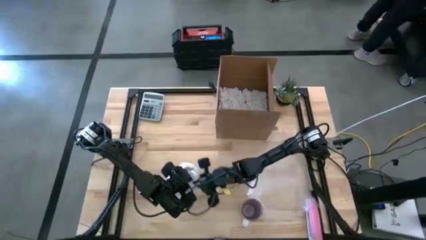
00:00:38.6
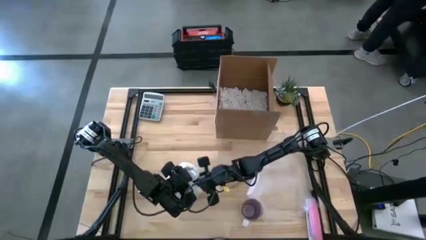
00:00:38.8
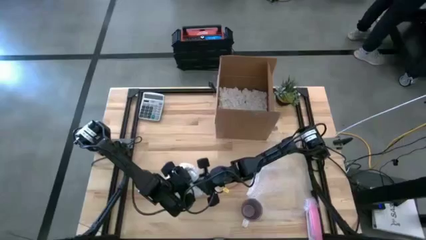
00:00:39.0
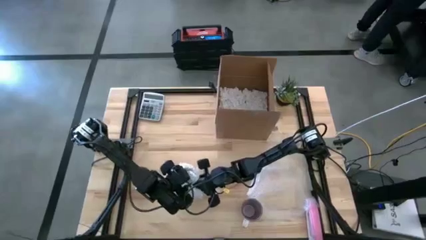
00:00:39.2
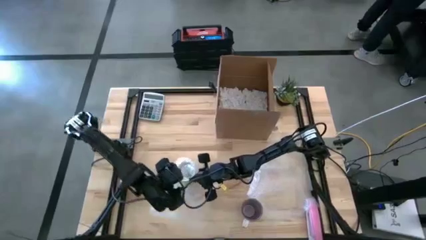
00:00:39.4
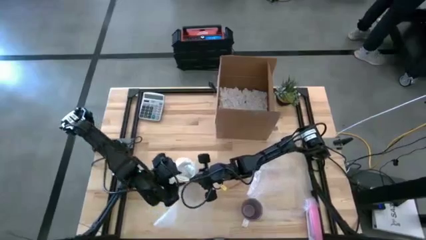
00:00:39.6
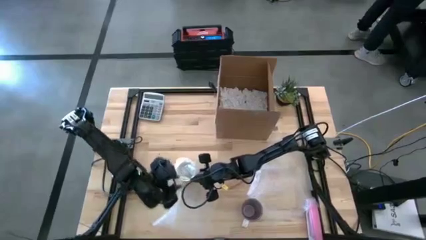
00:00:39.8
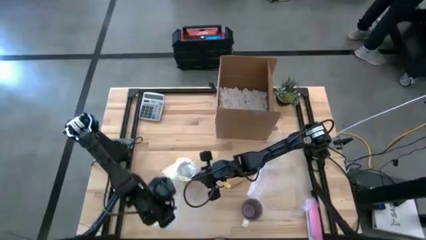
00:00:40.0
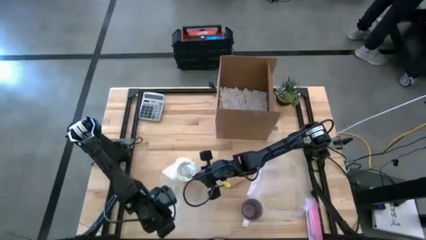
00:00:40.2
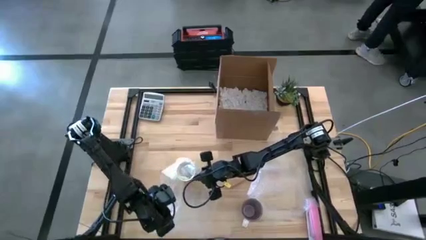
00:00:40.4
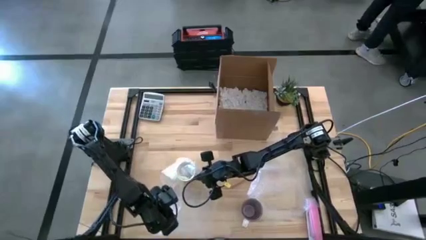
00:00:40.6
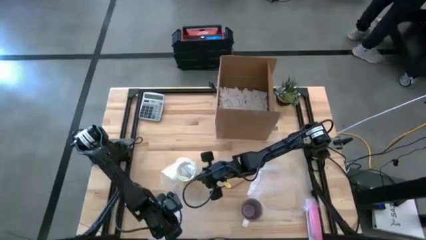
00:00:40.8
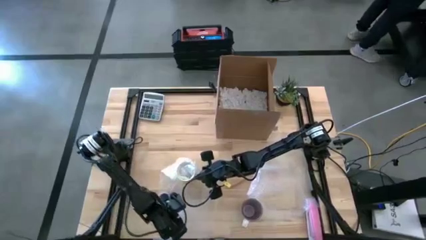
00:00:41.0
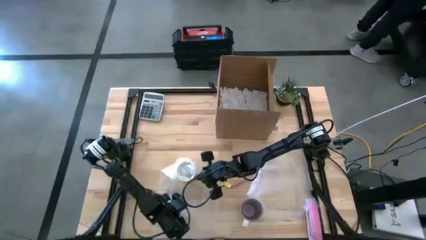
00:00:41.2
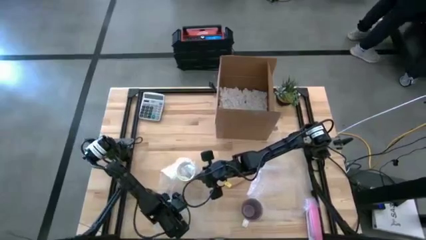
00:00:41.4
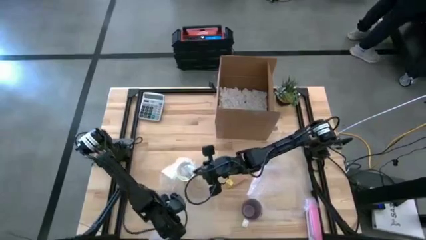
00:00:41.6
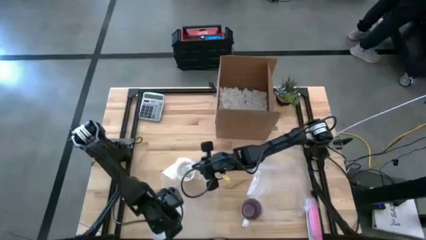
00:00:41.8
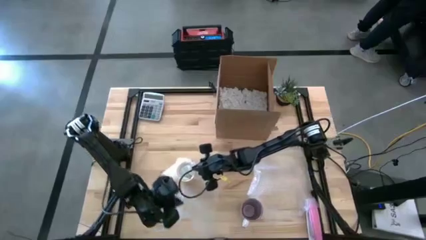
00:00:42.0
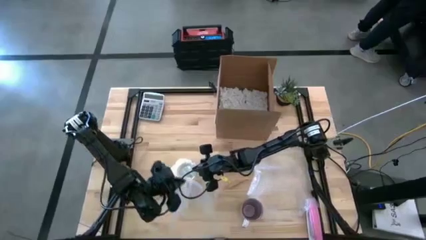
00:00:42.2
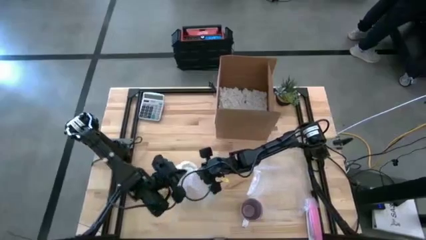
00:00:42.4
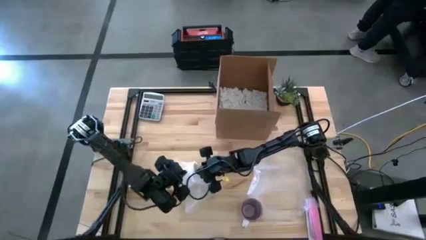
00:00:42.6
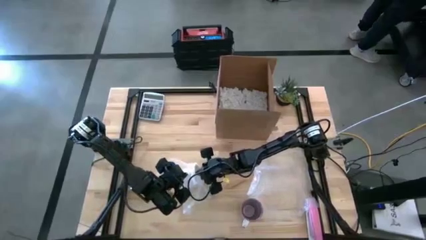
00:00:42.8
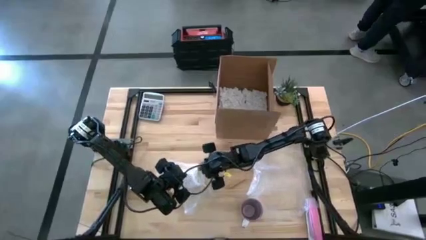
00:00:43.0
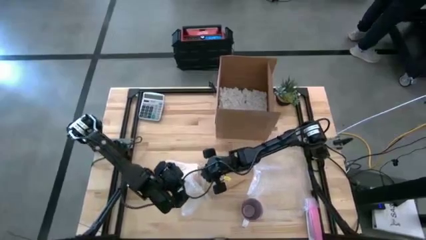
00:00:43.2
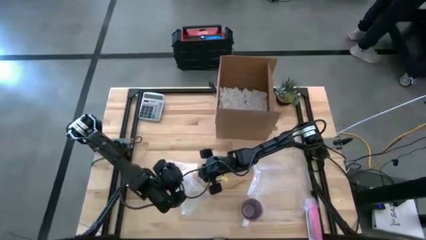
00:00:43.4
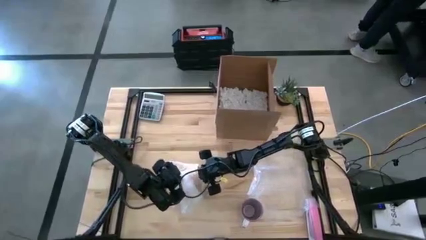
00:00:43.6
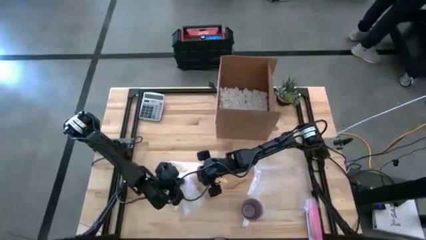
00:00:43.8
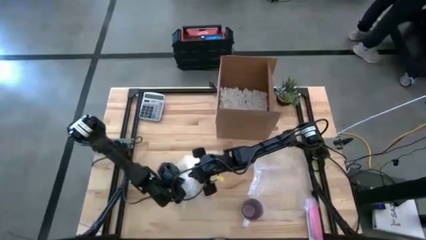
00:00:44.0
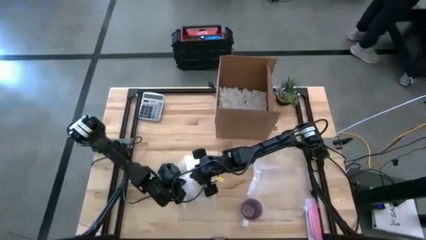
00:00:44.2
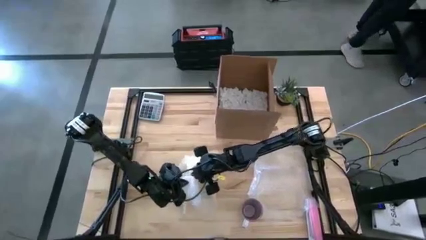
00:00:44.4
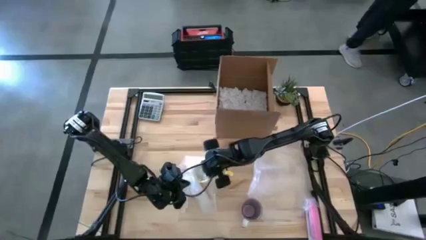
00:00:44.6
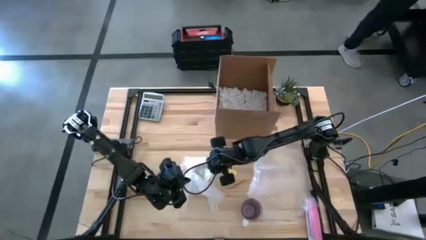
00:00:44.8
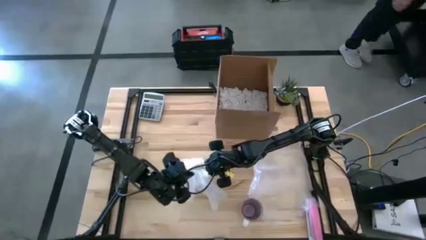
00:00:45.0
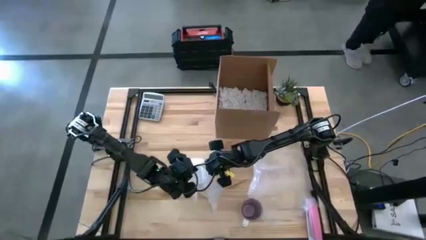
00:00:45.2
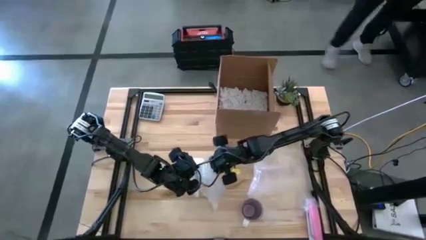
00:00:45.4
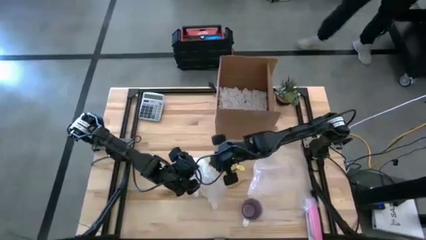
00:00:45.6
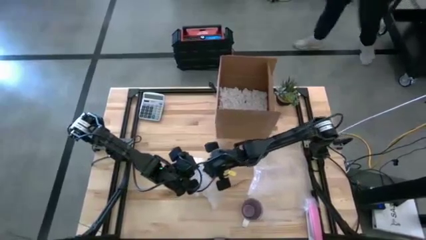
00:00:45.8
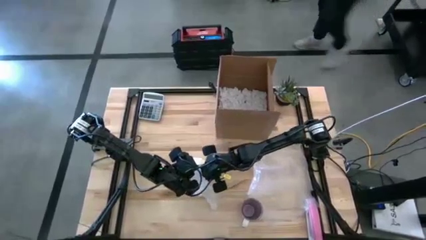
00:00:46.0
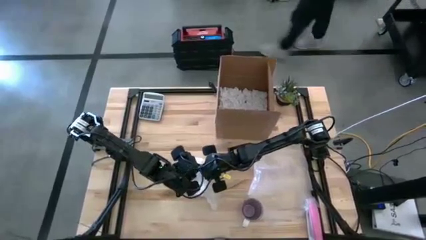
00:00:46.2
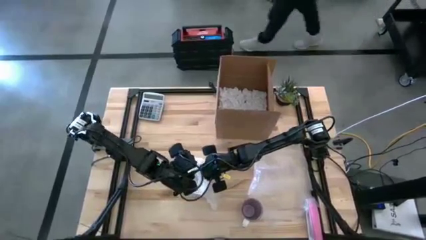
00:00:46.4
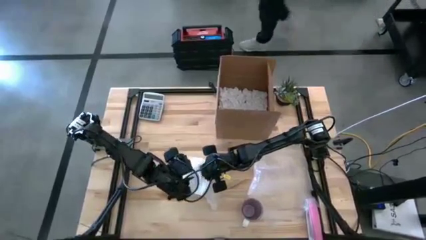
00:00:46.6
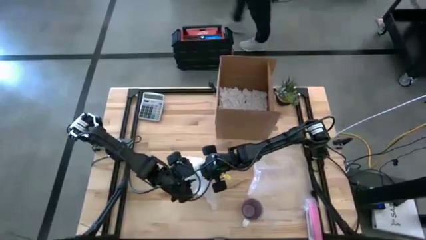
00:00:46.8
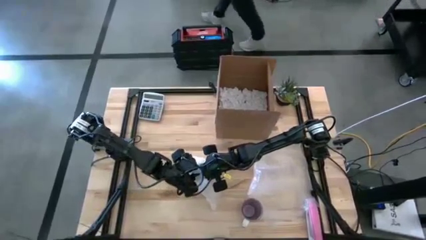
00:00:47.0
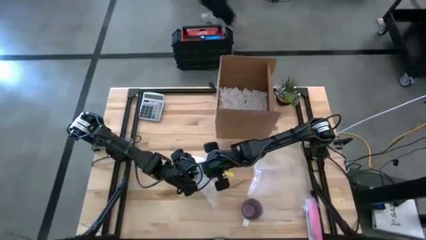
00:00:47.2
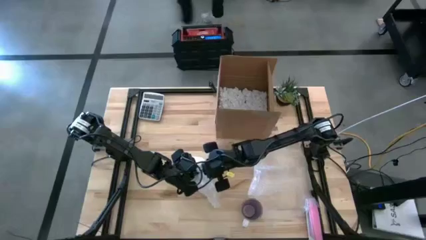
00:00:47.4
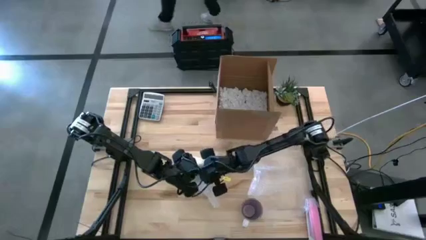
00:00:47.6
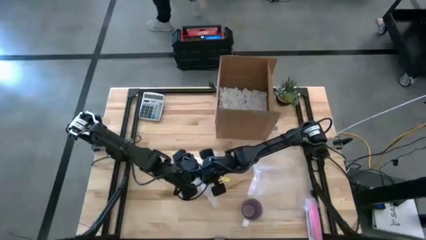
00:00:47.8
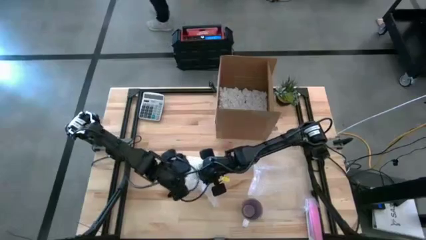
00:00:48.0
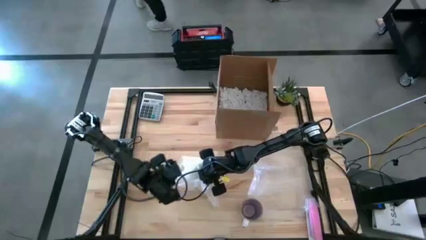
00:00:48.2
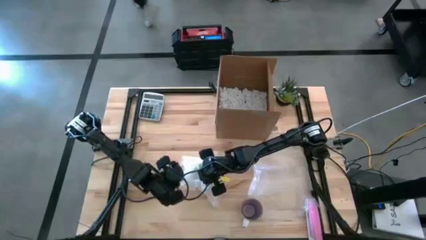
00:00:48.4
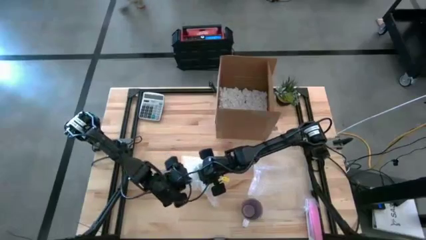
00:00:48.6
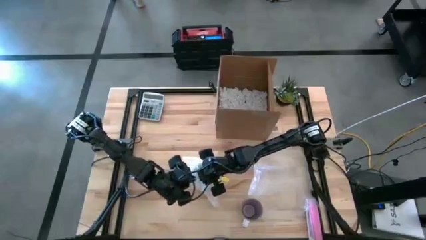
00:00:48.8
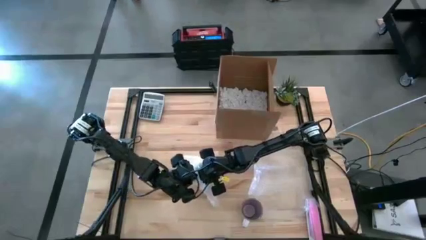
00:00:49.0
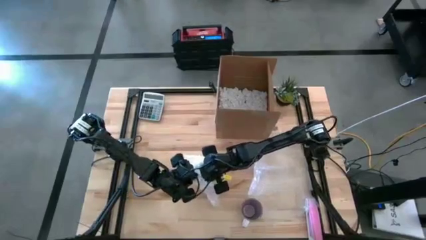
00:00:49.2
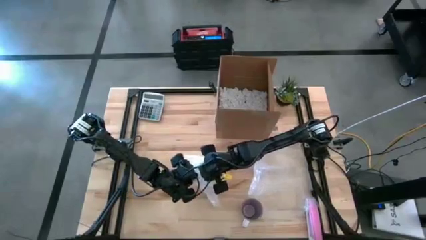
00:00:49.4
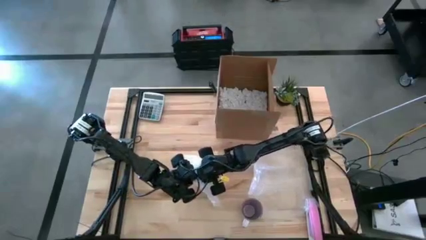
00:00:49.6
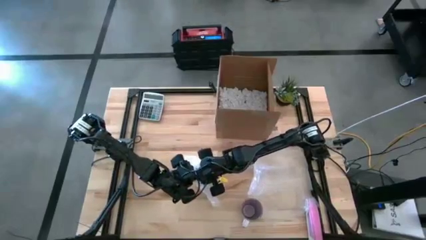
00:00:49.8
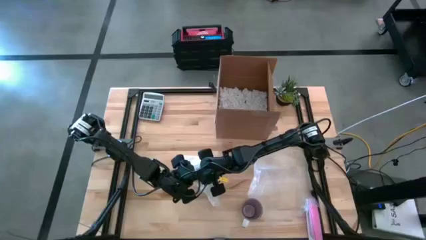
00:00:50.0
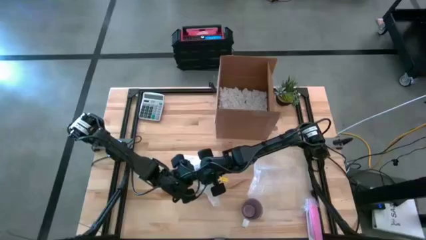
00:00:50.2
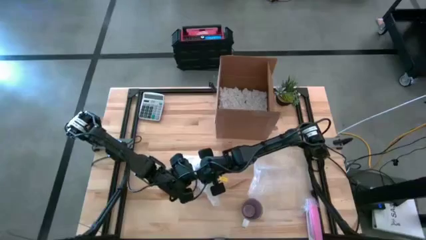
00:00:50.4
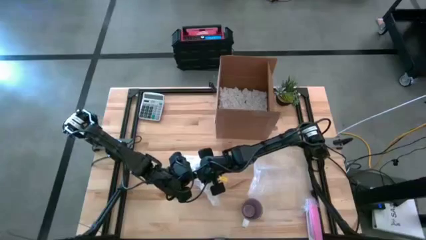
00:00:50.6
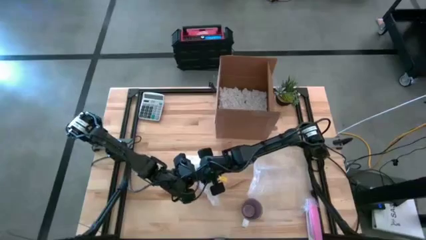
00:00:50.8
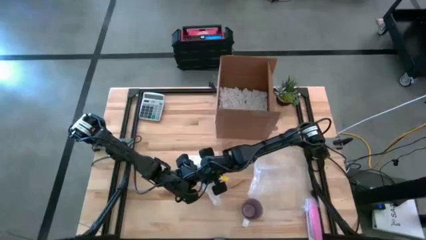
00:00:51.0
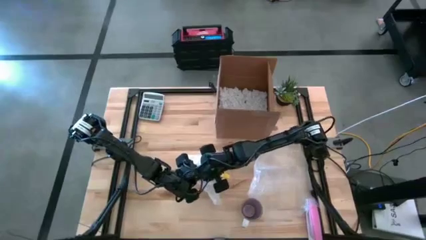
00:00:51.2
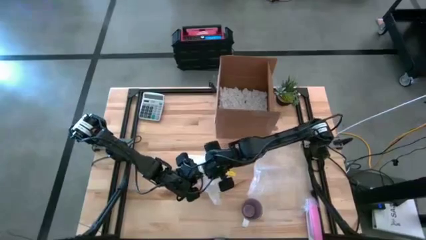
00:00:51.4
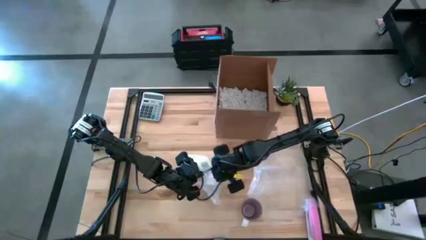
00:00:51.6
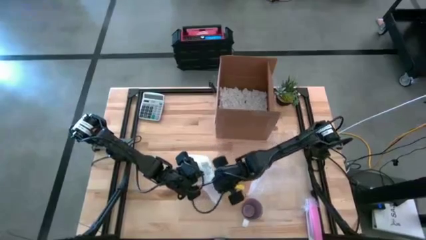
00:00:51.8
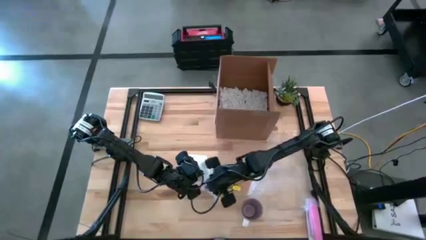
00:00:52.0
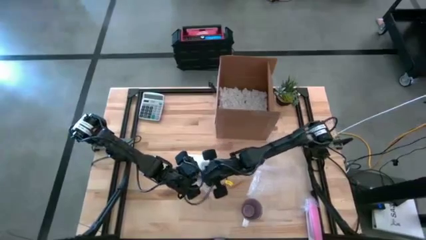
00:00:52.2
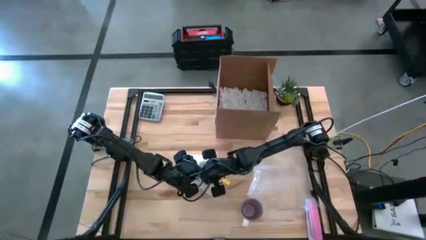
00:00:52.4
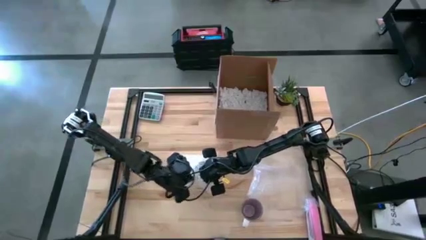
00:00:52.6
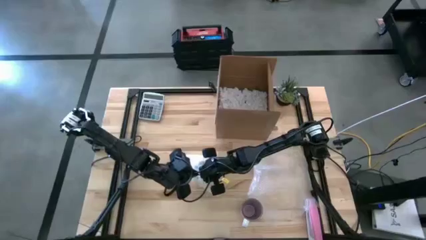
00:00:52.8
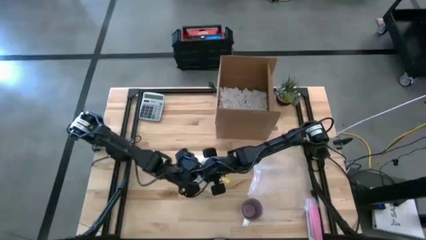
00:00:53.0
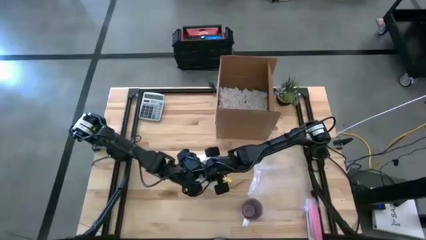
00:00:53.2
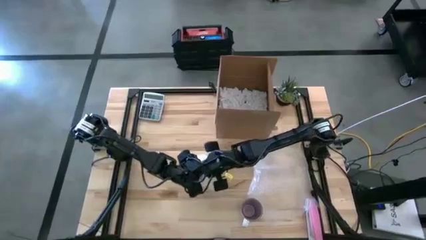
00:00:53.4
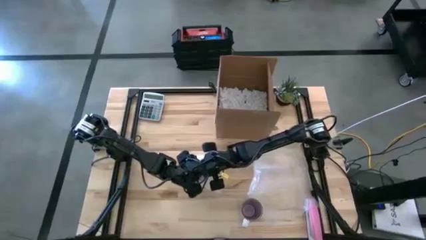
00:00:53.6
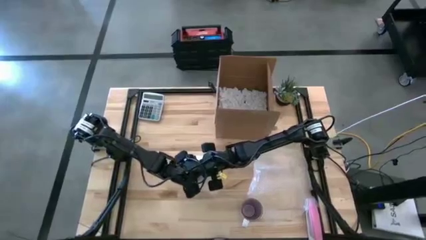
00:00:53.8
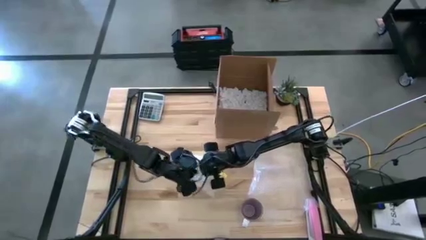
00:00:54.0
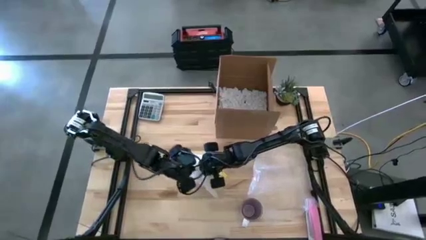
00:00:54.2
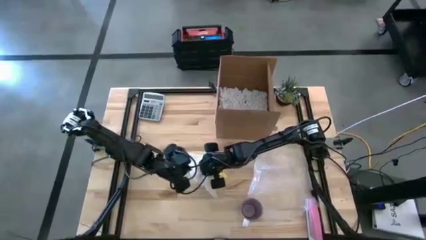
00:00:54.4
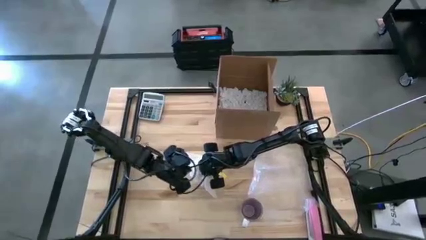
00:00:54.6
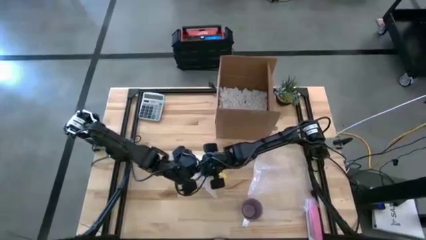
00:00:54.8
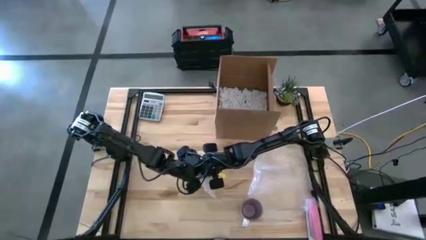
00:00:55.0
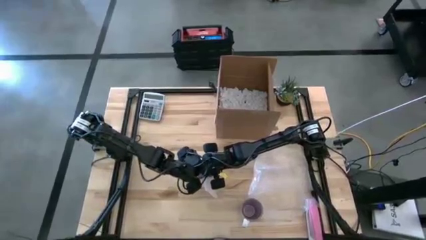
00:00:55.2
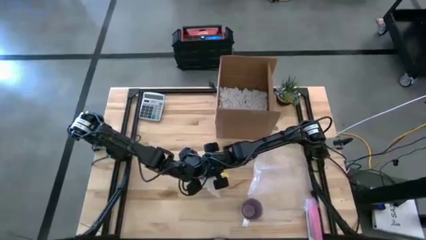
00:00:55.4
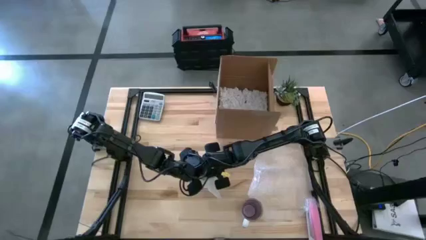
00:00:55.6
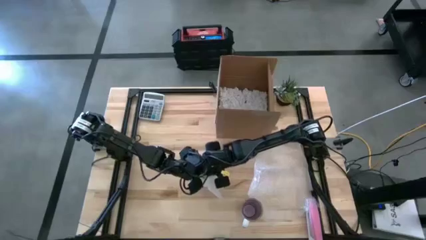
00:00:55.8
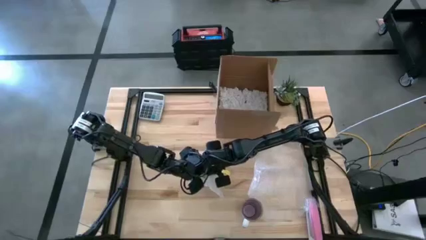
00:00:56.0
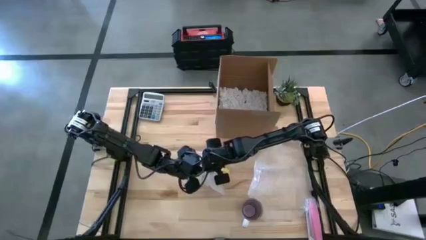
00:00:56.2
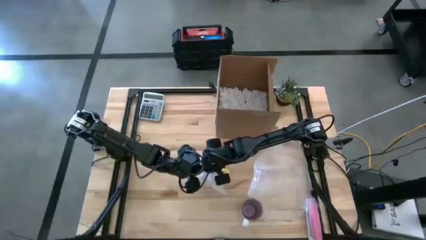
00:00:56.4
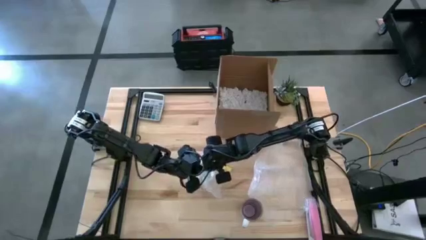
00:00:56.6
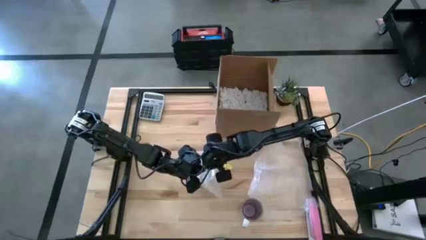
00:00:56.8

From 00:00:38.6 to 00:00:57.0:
Task: wrap mug
Wrap the orange patterned mug with the left transparent bubble wrap
